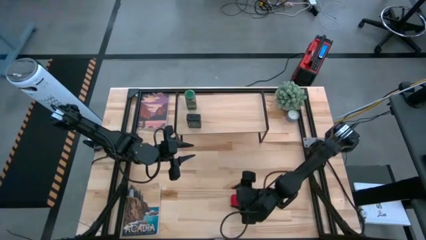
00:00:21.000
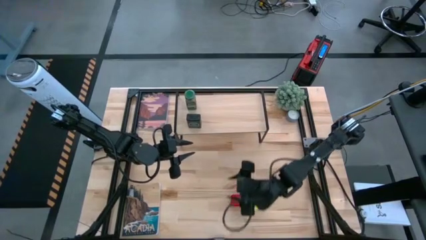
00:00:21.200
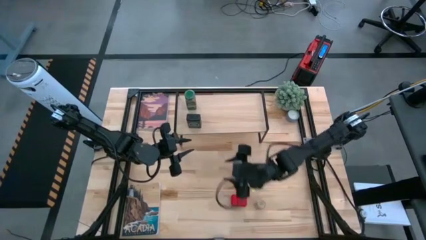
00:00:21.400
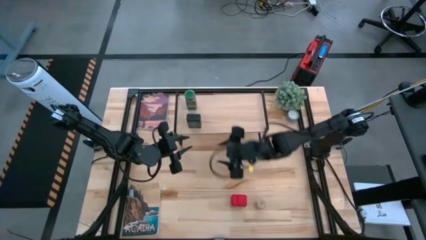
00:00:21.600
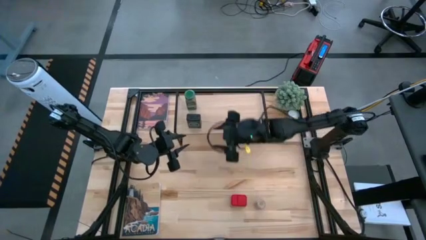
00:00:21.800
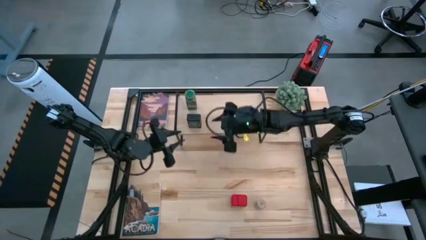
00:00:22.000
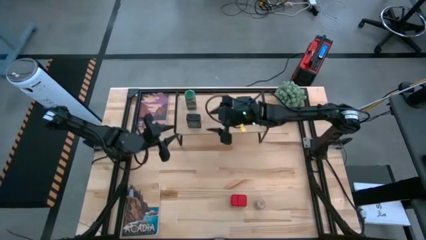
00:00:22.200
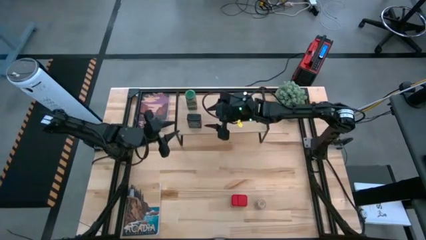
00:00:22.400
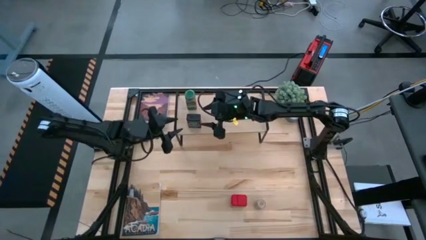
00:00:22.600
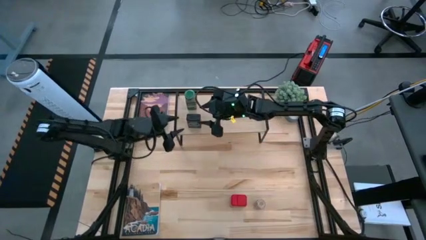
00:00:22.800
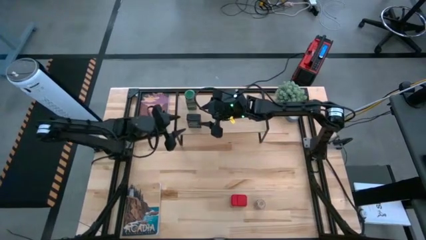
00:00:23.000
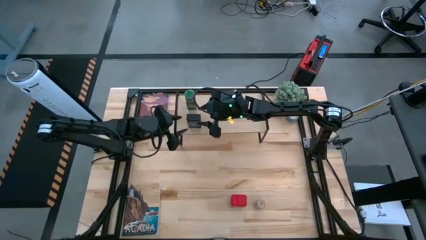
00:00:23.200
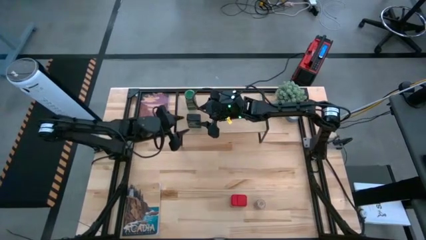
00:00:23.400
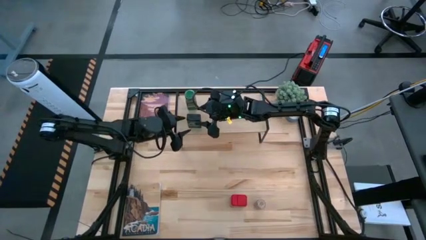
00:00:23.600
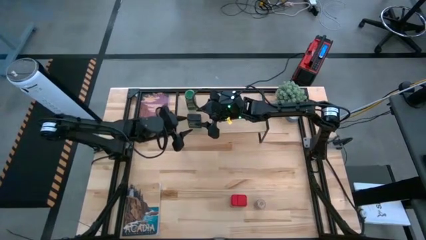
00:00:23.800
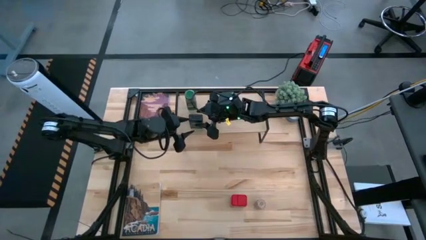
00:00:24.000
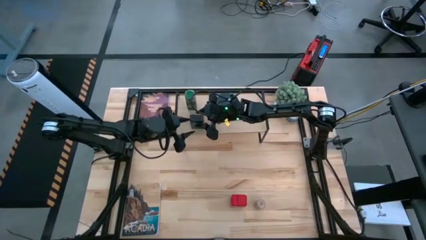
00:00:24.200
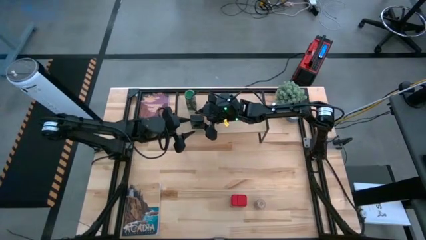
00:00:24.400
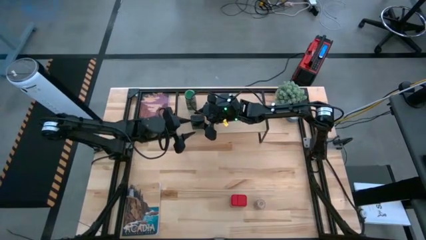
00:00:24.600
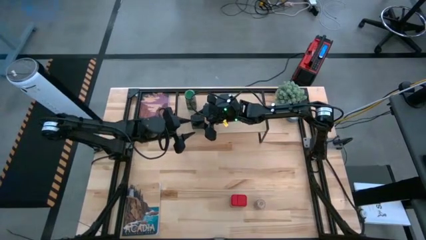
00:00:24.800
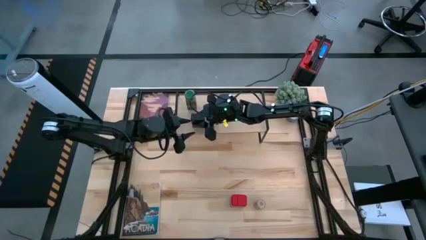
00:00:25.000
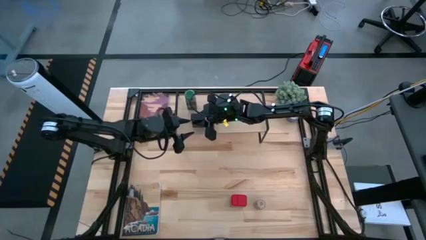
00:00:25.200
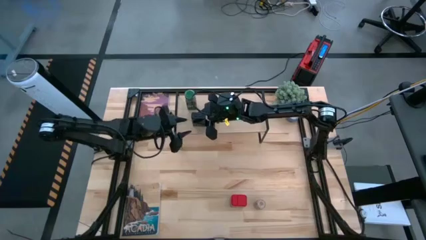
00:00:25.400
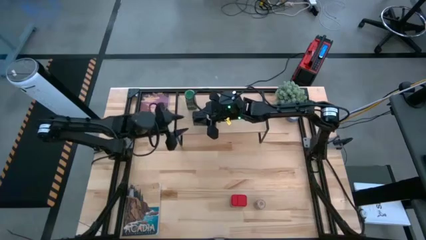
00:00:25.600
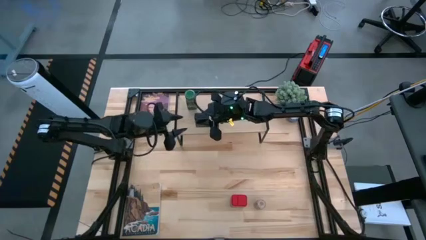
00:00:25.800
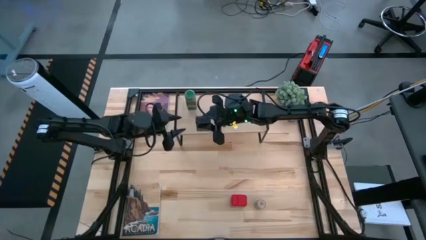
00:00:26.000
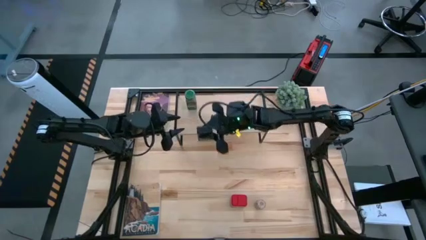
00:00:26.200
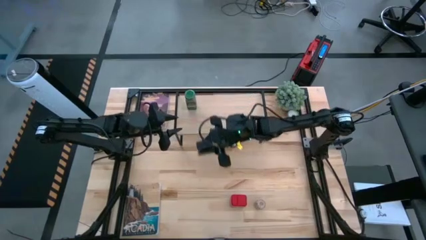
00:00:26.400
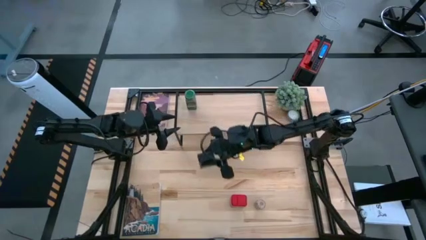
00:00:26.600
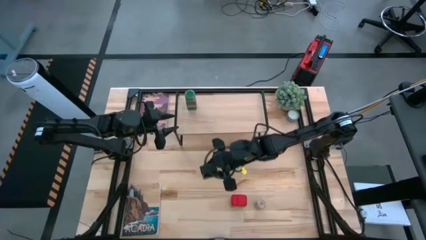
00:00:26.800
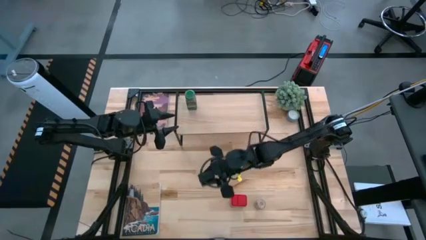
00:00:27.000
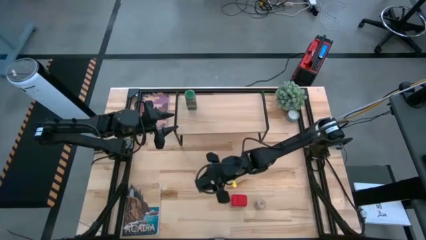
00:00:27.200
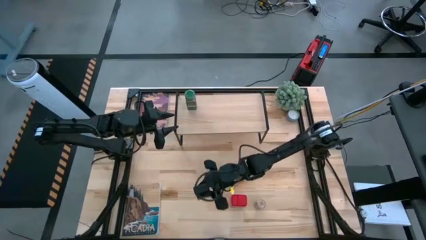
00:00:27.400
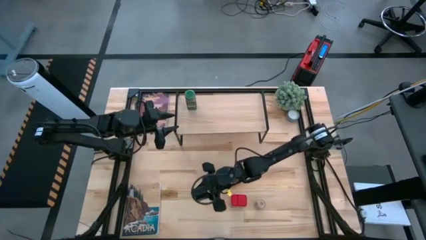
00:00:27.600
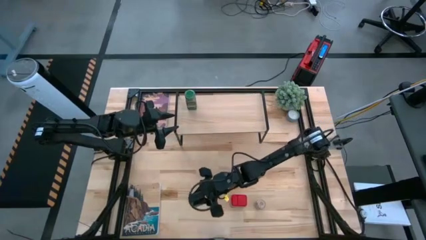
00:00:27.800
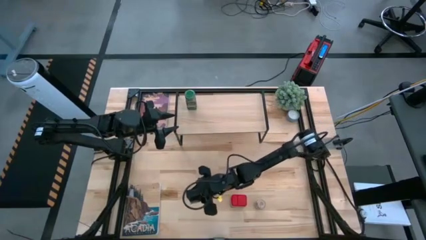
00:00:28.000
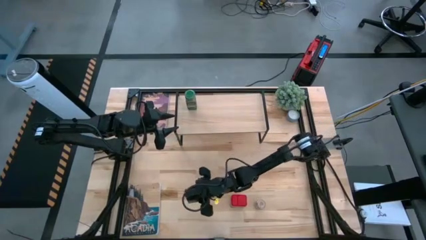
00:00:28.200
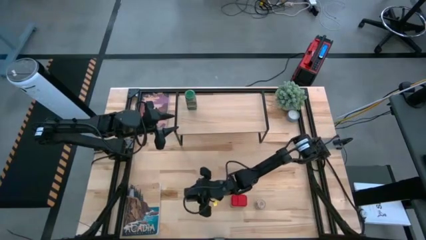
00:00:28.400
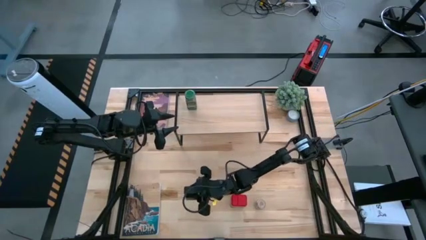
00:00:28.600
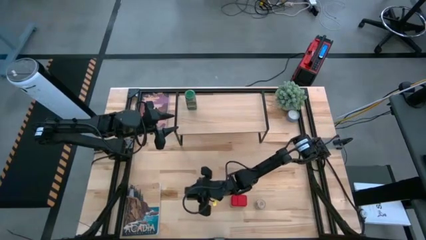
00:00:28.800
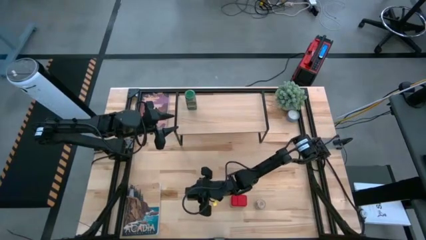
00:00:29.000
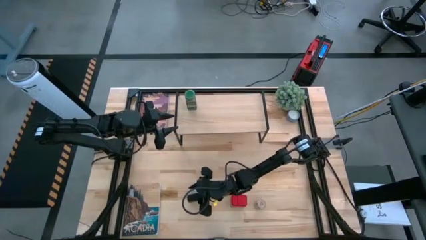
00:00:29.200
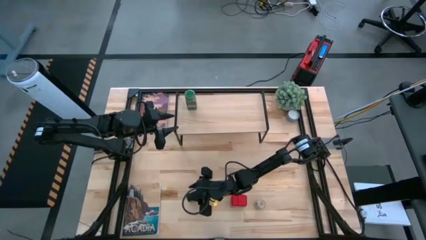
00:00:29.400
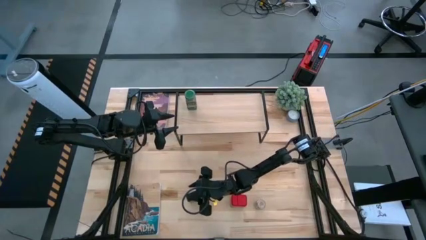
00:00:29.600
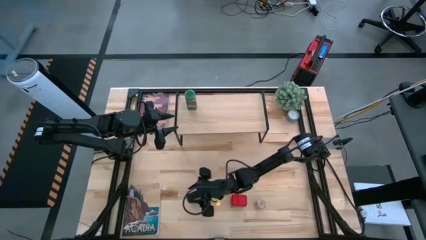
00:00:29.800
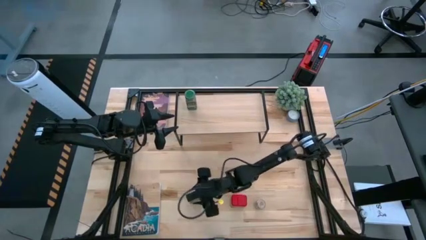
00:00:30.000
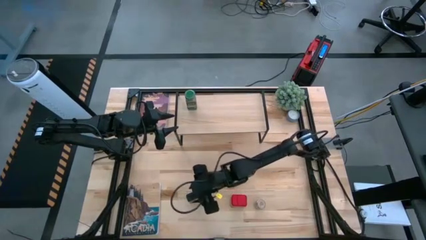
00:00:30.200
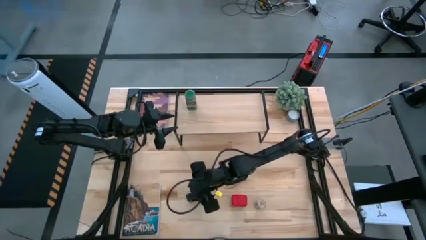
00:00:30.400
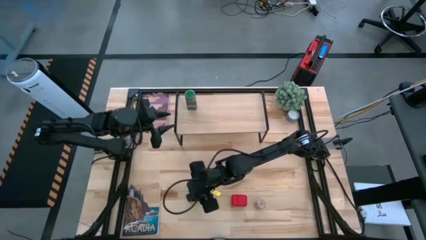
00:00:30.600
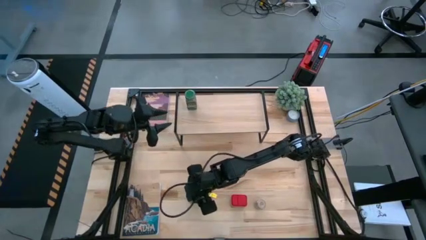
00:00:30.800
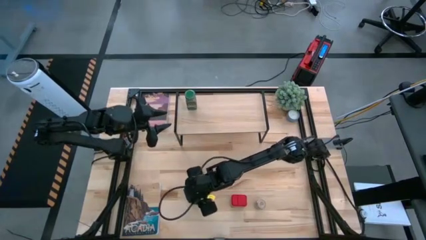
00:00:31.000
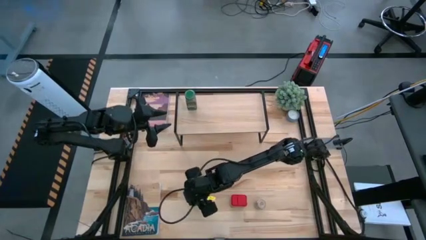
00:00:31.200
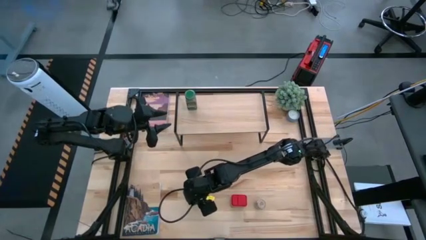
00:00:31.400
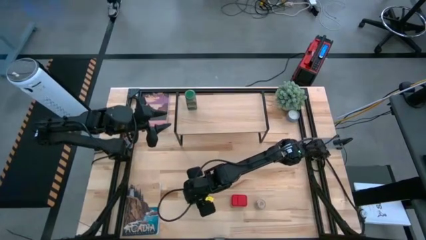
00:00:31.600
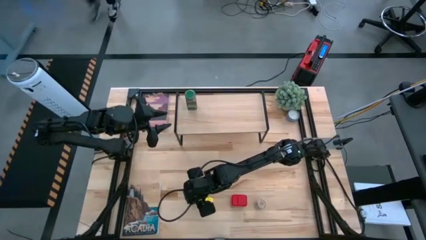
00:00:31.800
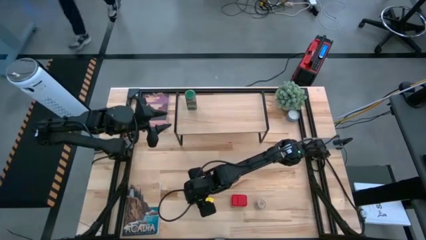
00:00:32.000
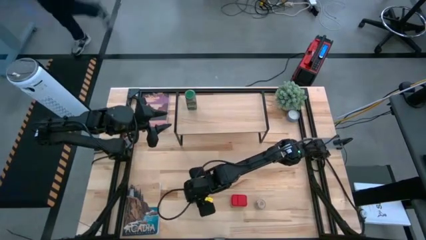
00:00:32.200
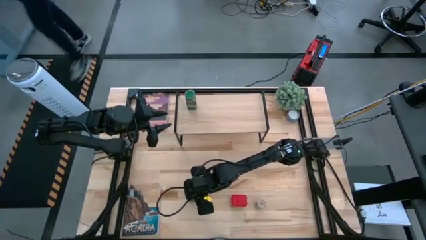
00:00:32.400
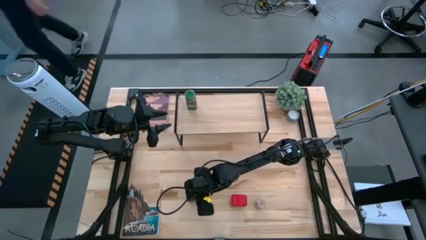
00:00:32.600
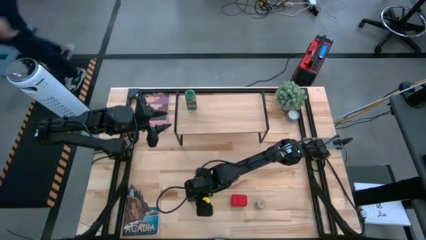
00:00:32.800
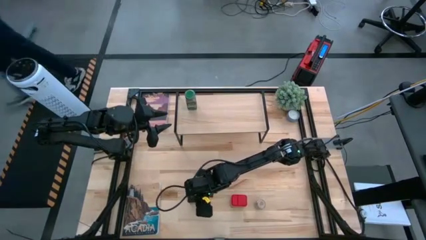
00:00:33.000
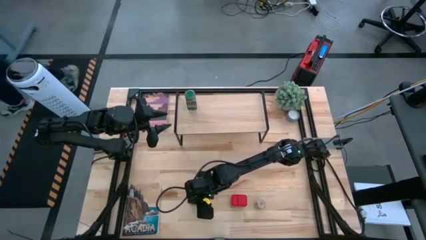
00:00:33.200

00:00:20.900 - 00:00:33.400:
Task: Shelf spices
Remove the green seasoning can from the shelf
